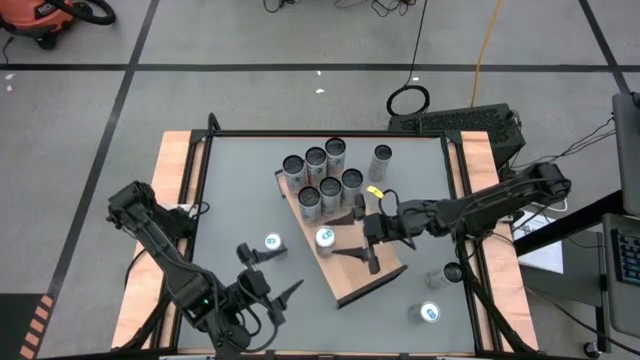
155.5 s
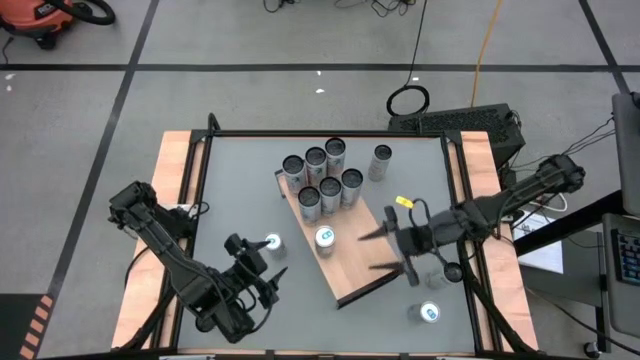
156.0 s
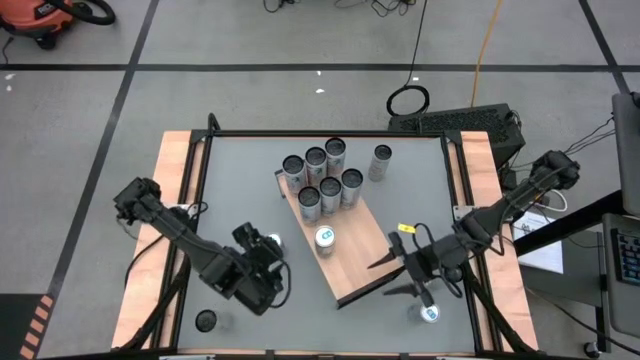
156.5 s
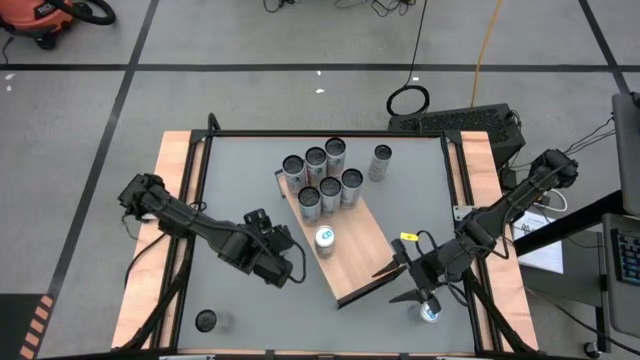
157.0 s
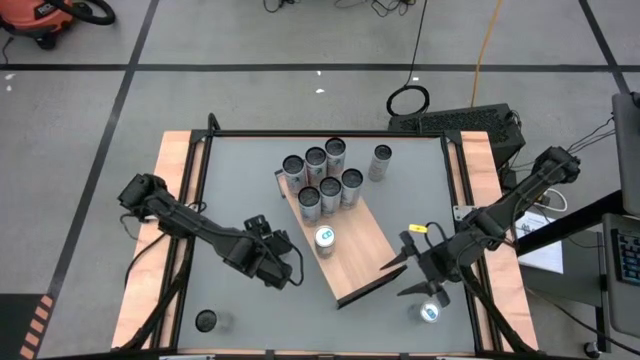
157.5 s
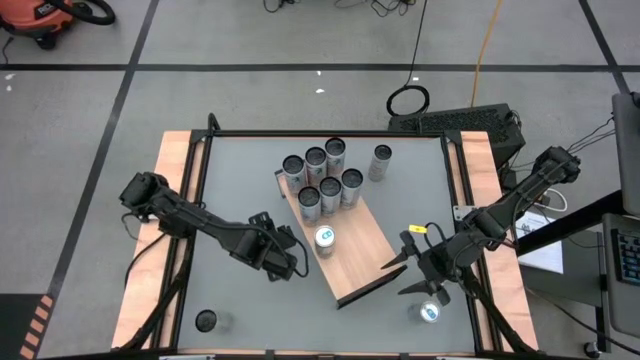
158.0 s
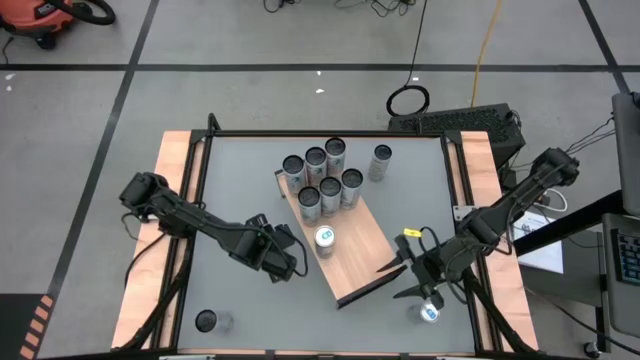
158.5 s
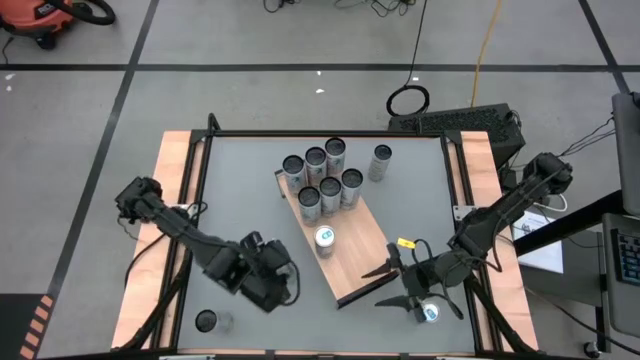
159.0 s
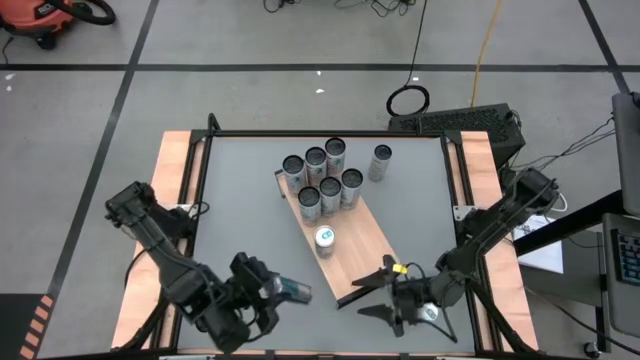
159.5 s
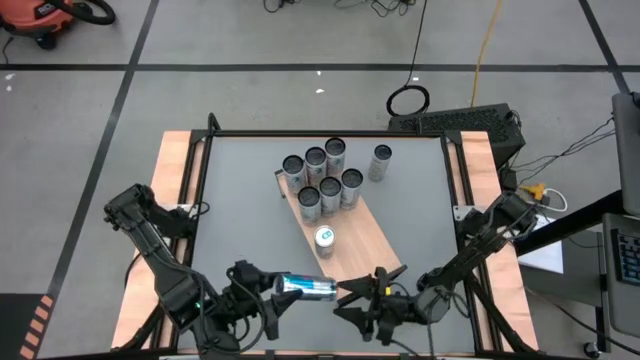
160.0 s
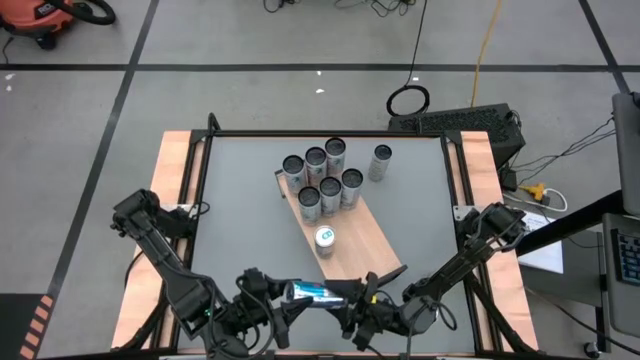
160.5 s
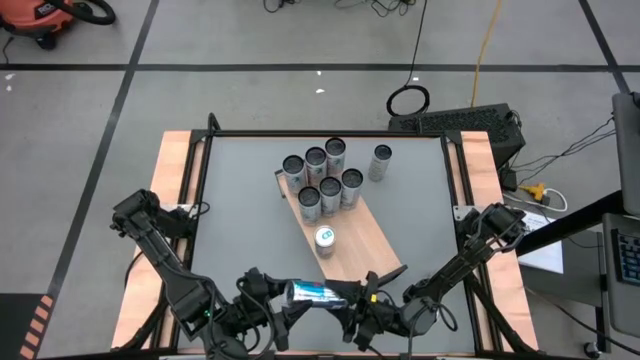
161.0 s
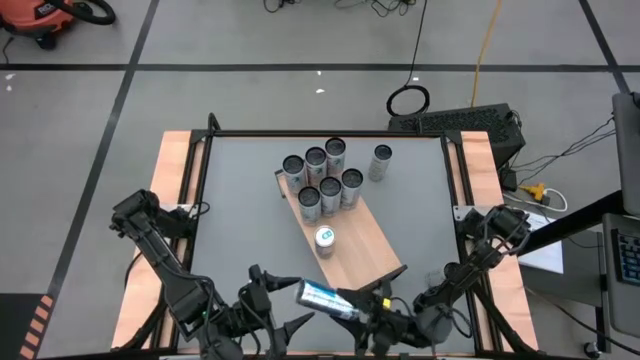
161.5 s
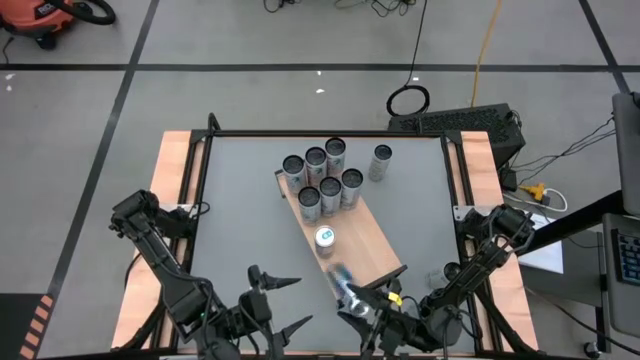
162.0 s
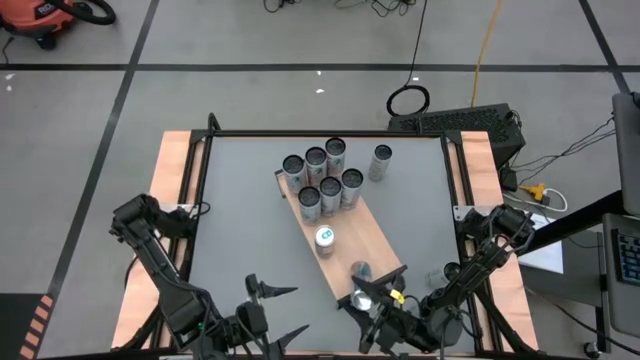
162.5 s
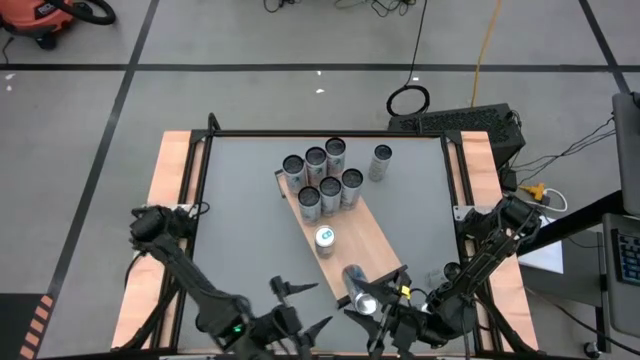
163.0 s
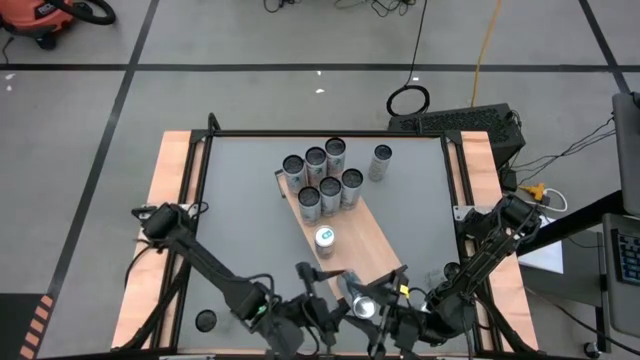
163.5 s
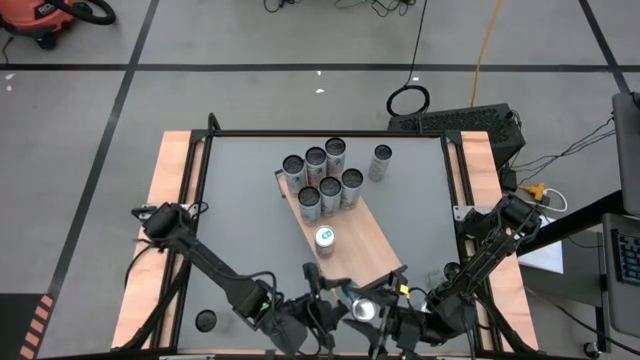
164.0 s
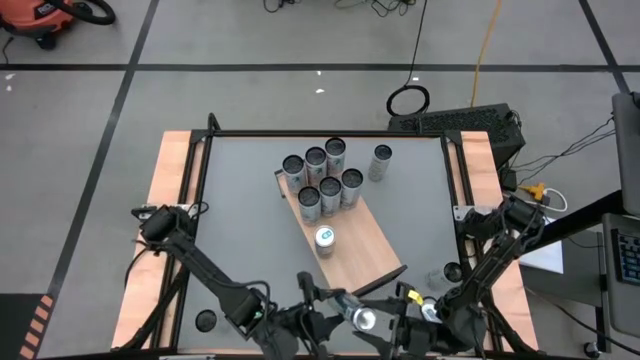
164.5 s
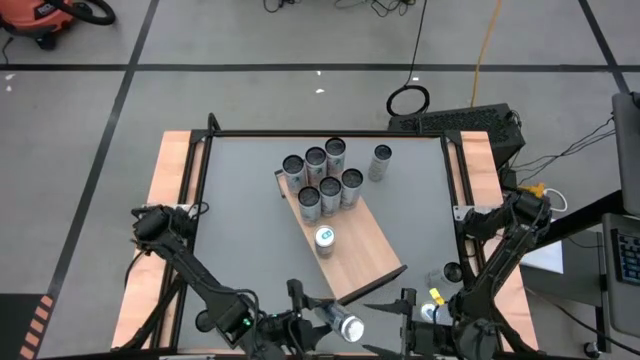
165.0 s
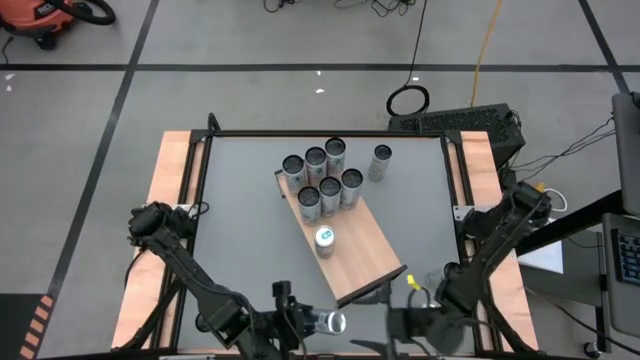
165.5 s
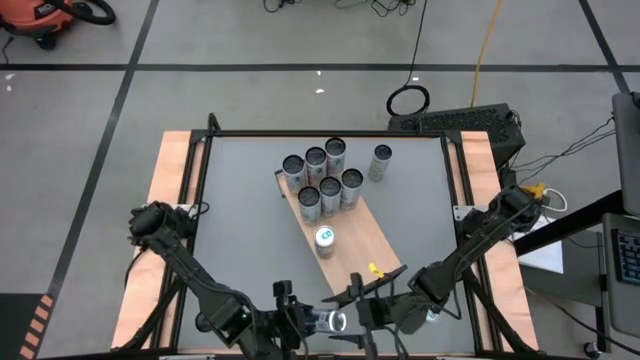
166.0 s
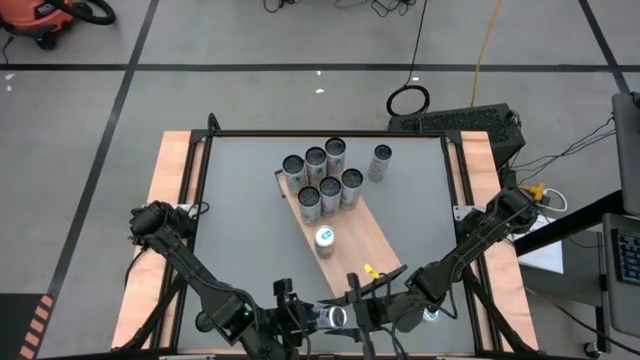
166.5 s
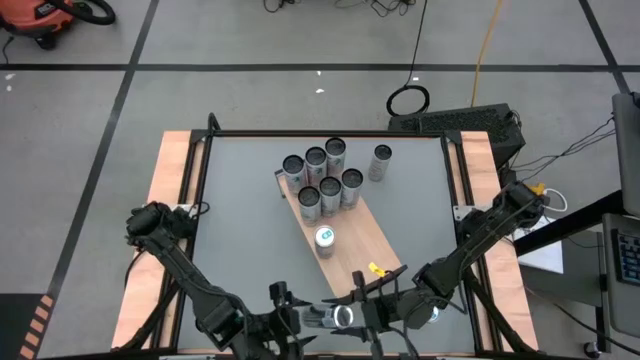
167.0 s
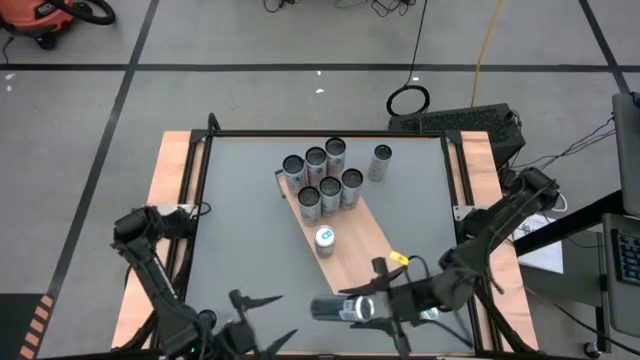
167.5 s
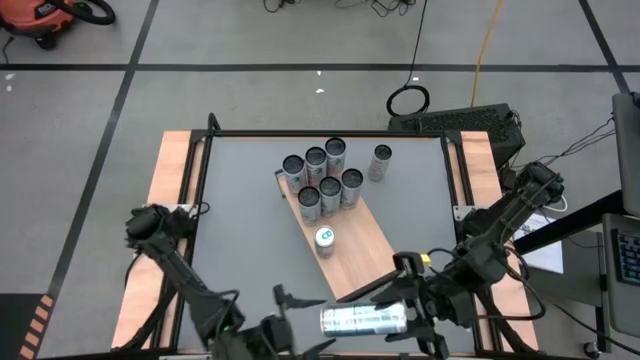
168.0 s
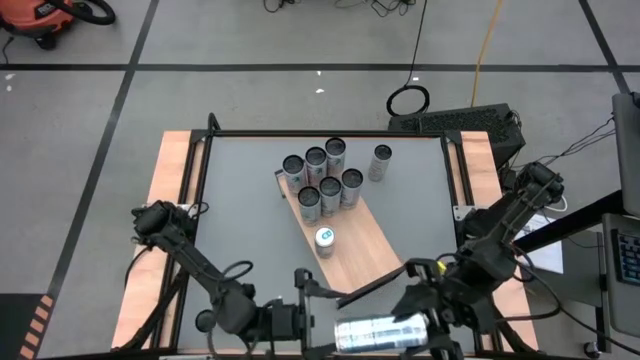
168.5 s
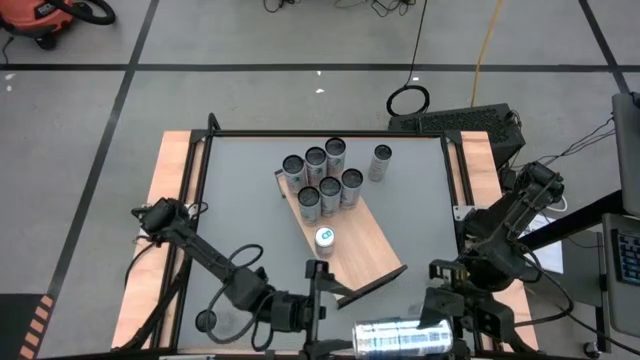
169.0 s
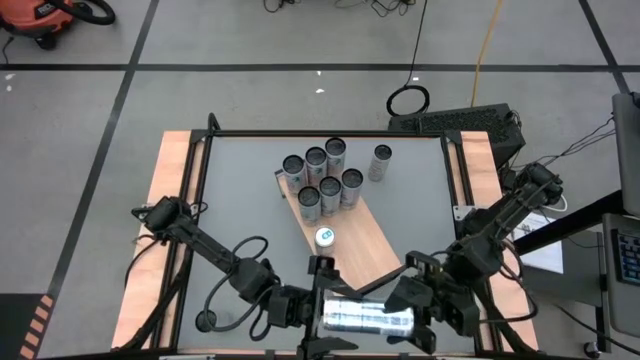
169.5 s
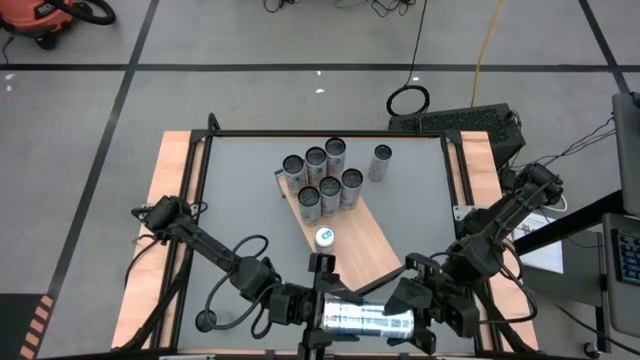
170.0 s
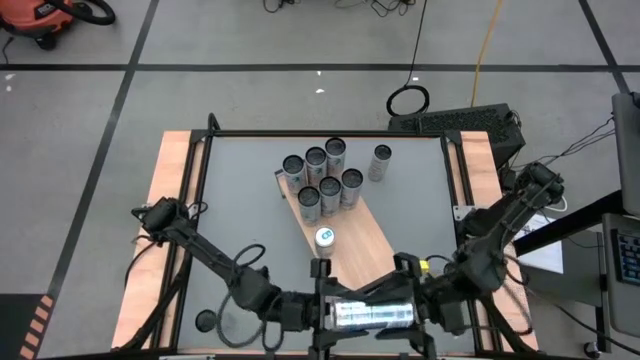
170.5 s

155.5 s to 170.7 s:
Task: Place canned beverage on shelf
Put the left blue soda can on the shelf aligned with the other blue soda can
